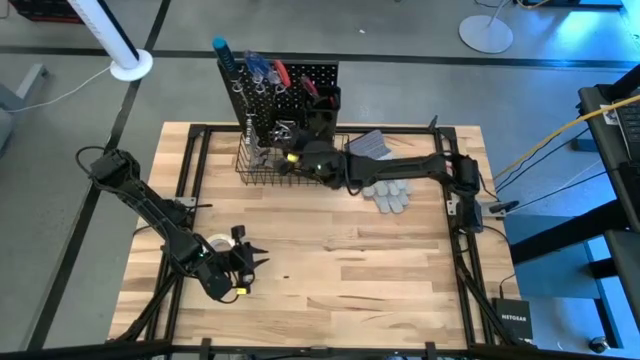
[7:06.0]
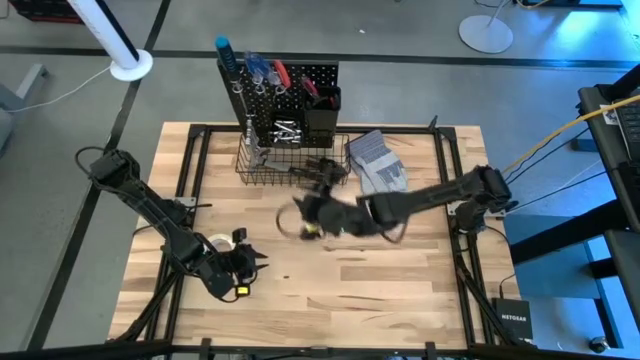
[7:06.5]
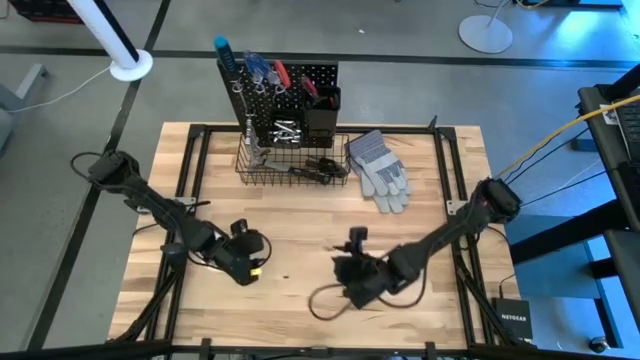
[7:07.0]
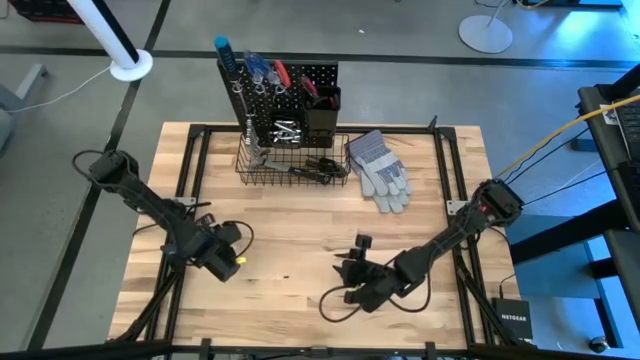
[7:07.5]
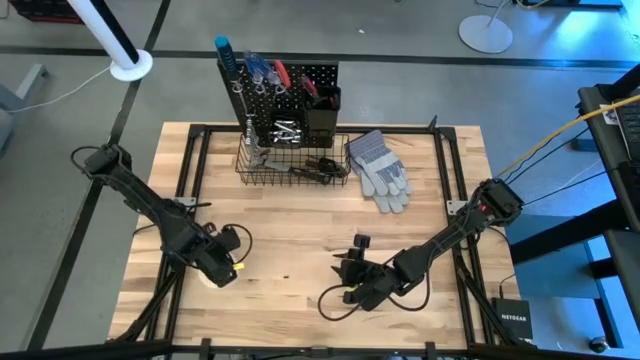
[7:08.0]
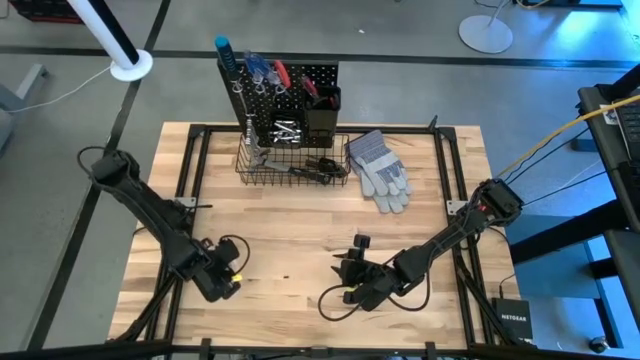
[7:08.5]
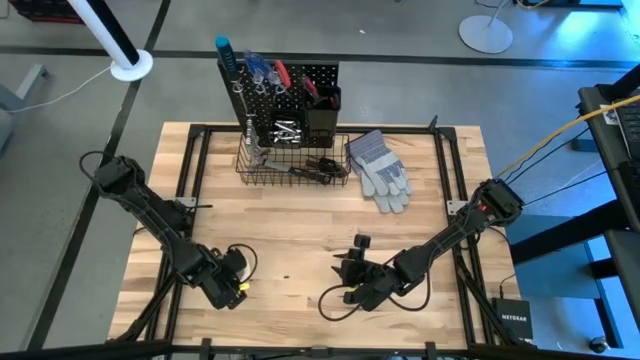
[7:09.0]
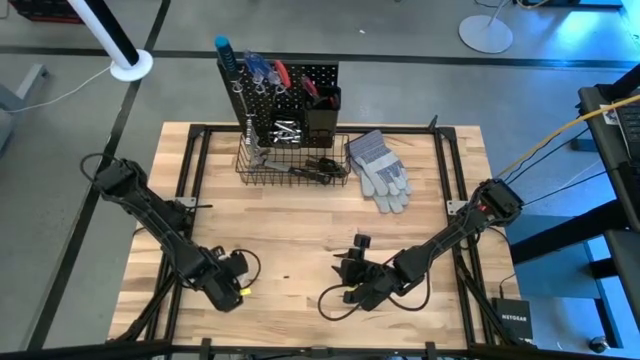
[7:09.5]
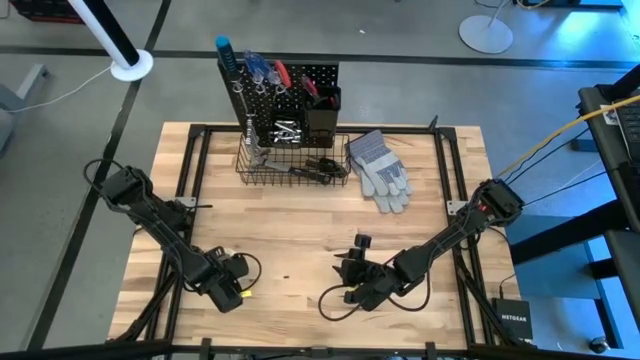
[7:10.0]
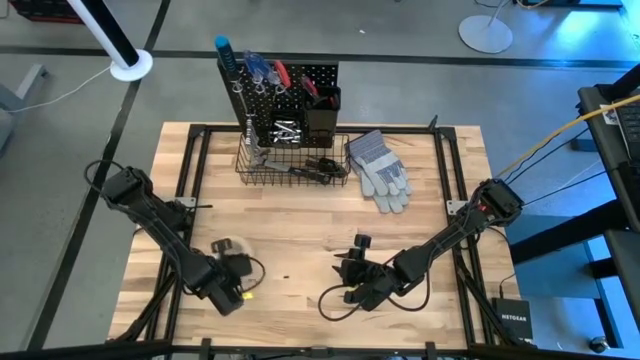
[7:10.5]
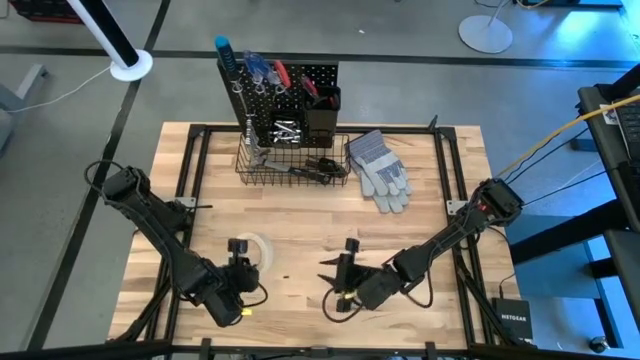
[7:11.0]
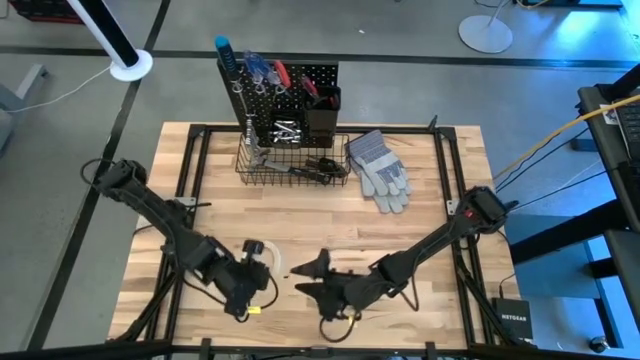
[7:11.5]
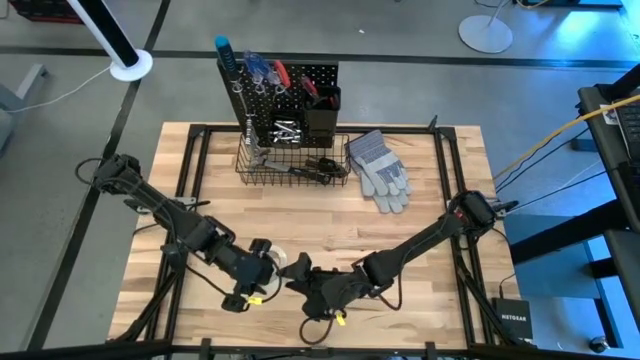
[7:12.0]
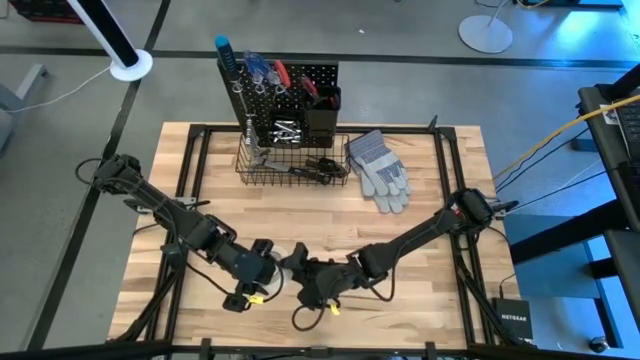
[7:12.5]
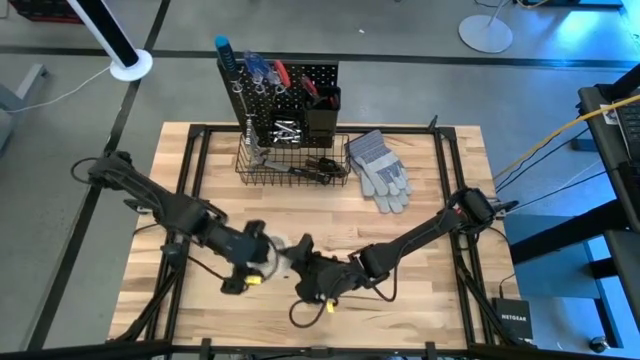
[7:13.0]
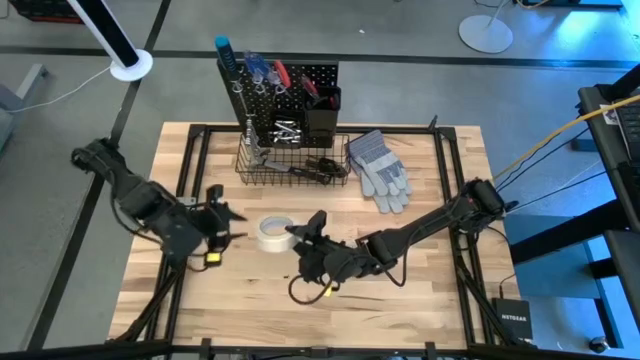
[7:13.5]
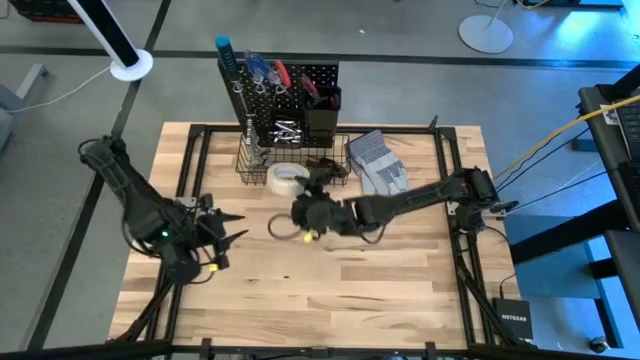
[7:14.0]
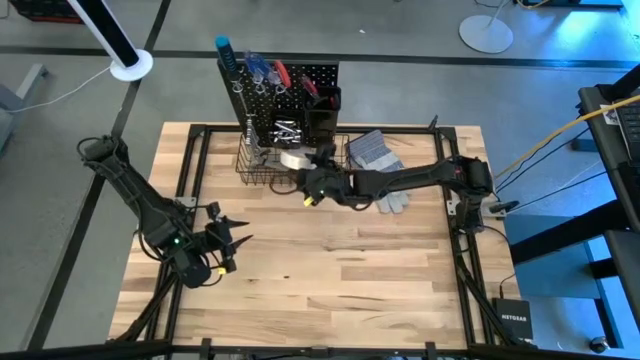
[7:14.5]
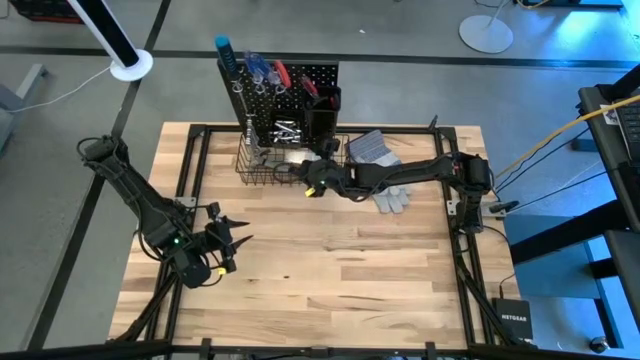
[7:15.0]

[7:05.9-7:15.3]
Task: Hang tools onto peg board
Put the adhesive tape into the wire basket on the peg board

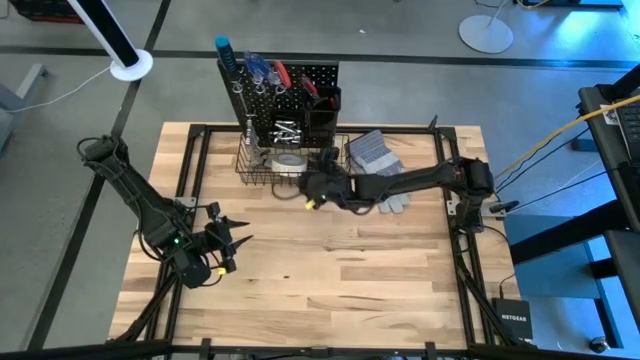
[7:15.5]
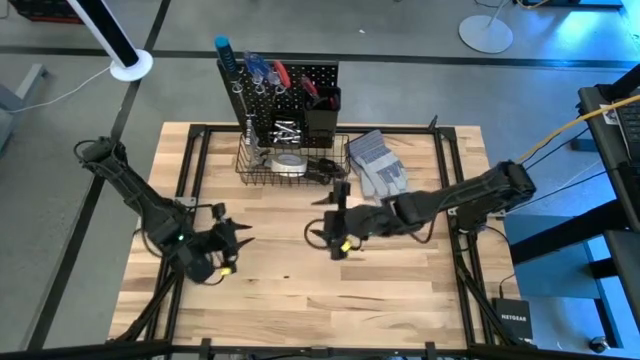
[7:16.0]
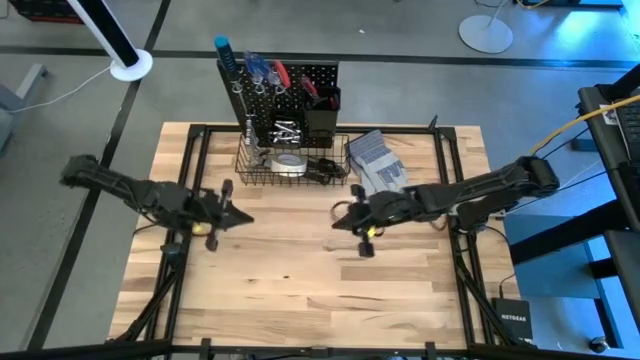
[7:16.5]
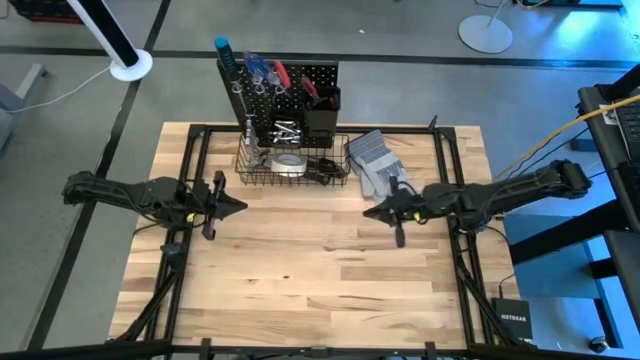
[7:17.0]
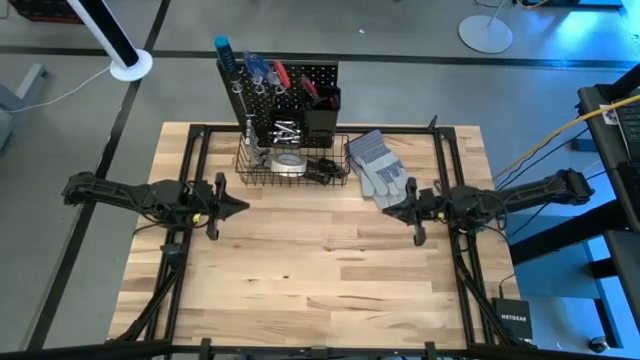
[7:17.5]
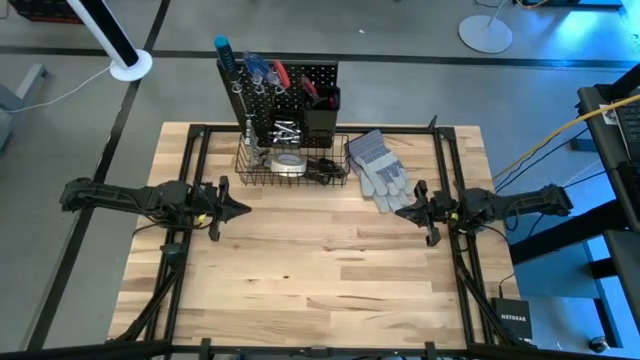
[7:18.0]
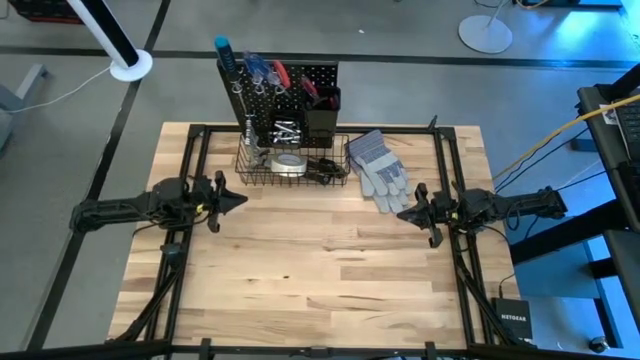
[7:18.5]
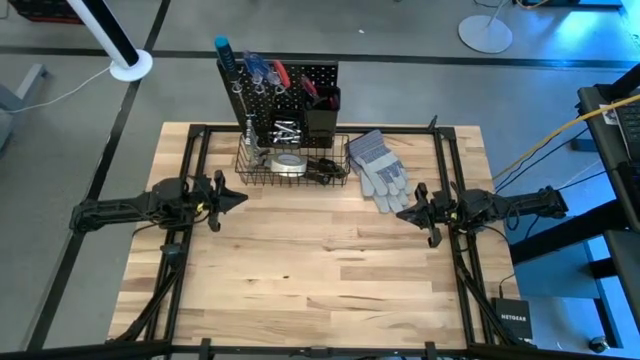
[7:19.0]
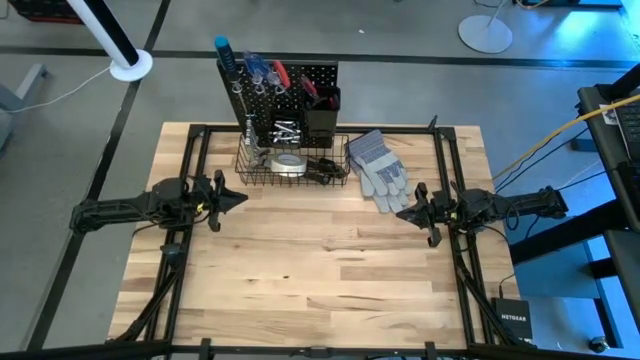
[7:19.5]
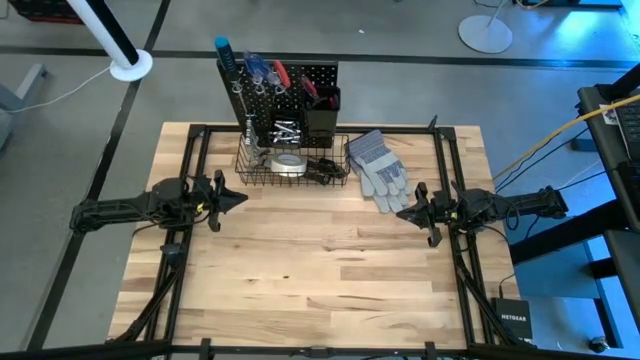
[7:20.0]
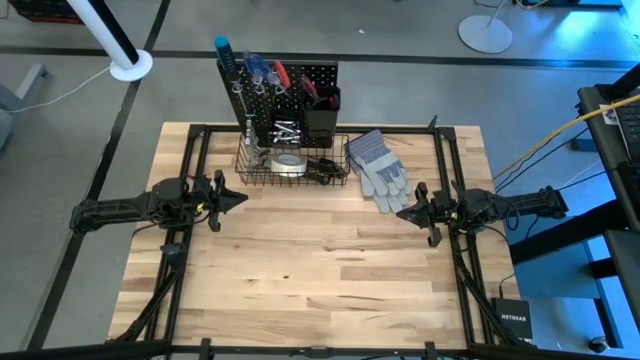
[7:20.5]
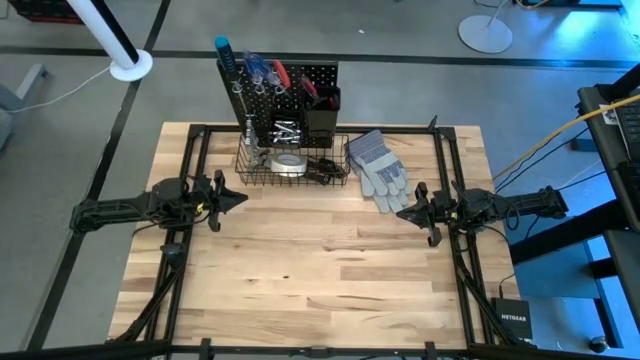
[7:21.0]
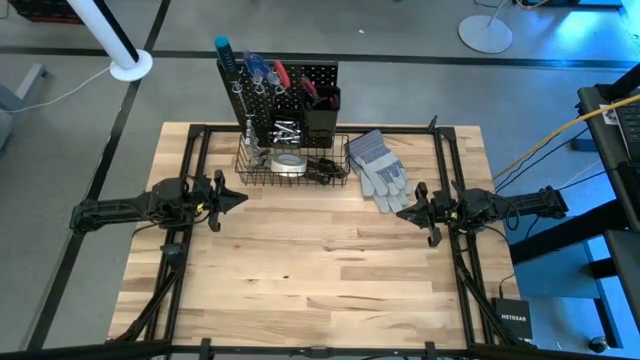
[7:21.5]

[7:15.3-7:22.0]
Return to Home Position

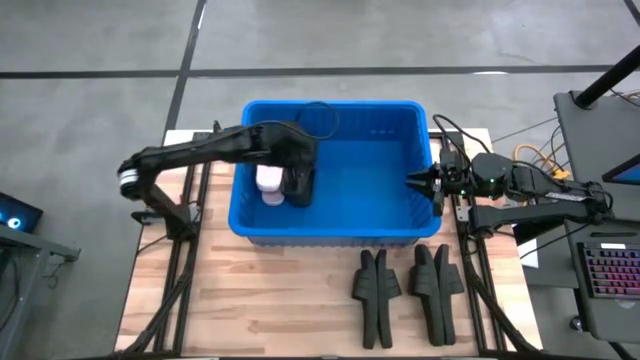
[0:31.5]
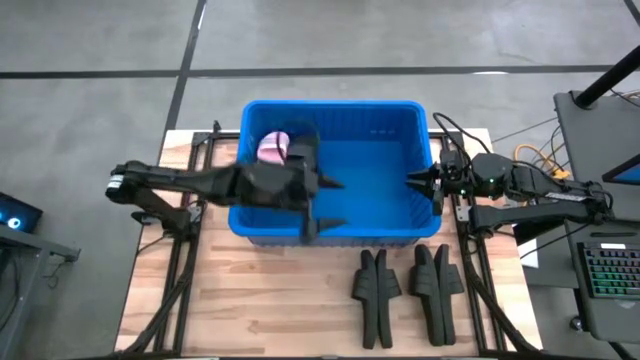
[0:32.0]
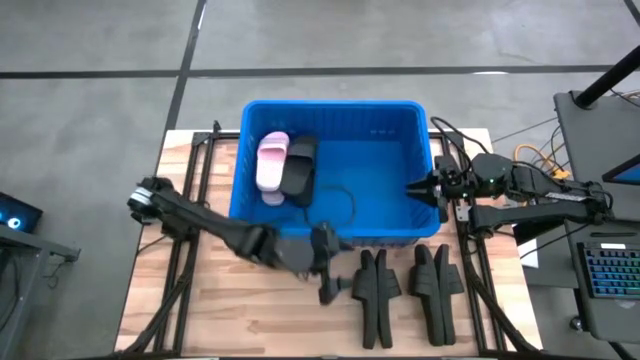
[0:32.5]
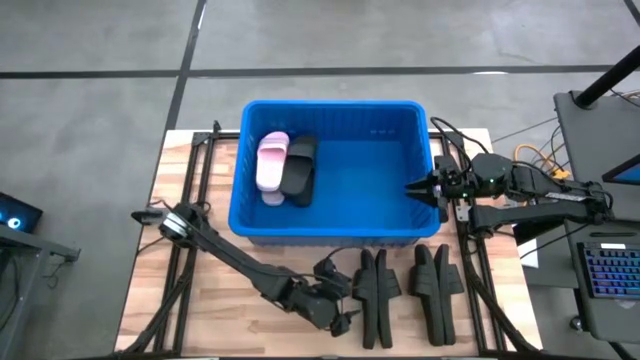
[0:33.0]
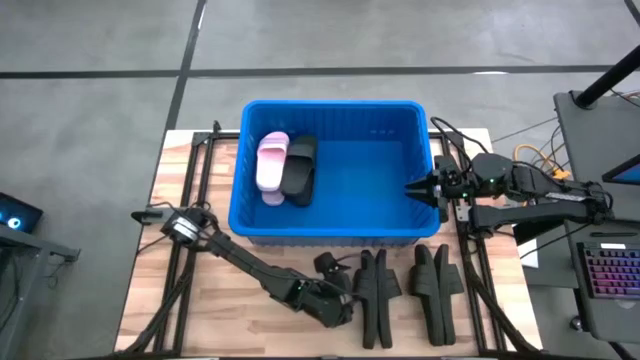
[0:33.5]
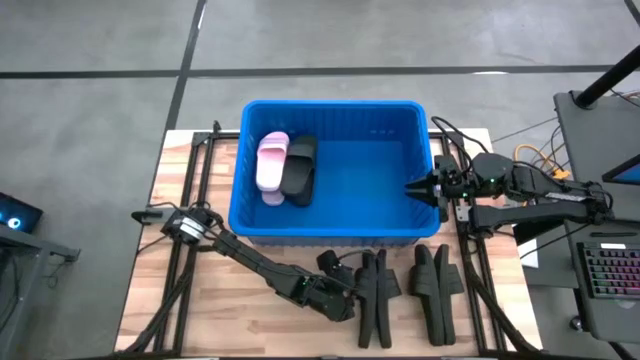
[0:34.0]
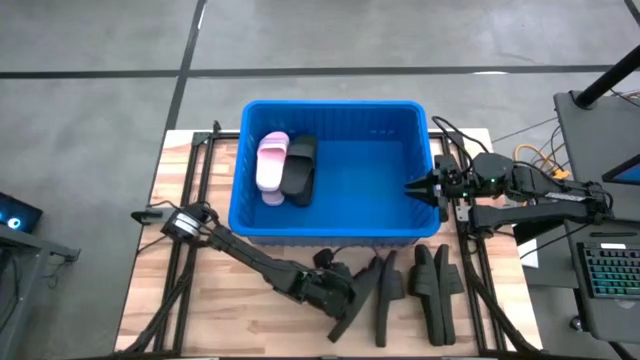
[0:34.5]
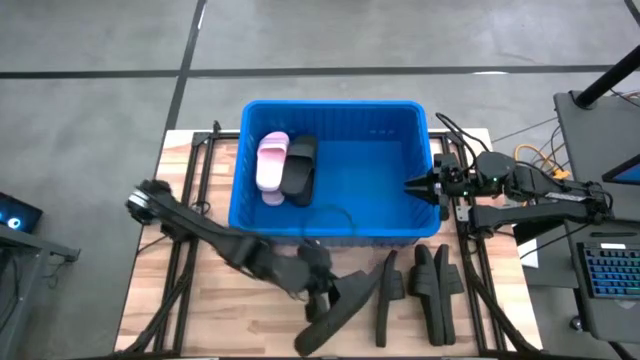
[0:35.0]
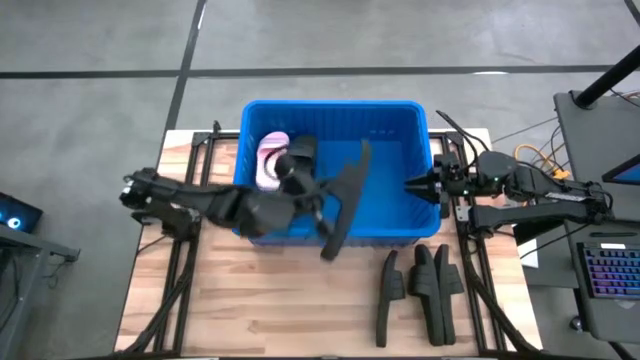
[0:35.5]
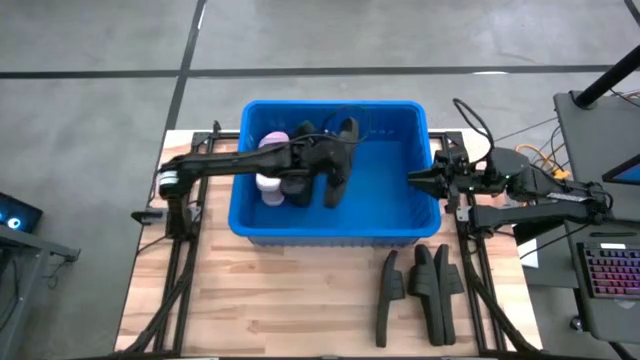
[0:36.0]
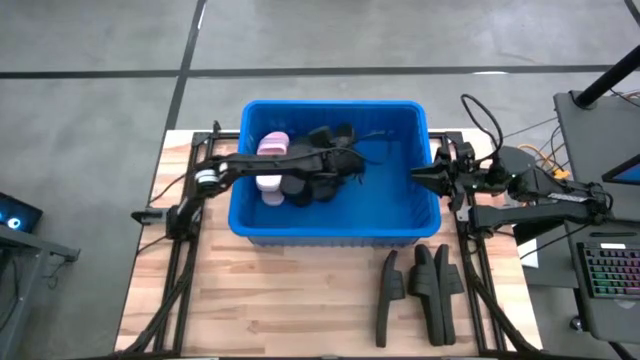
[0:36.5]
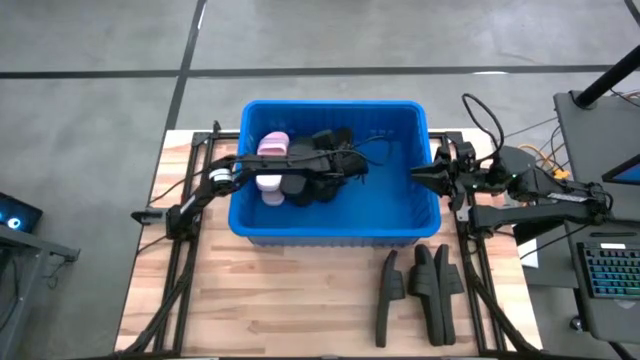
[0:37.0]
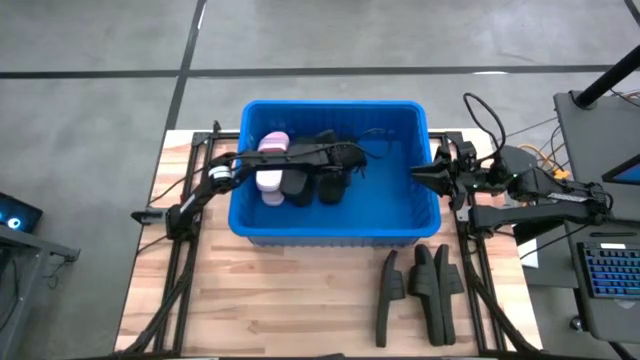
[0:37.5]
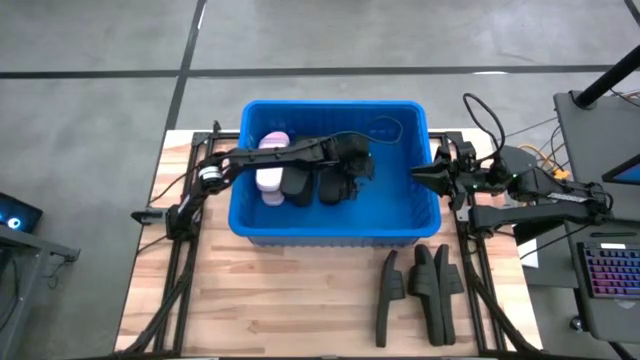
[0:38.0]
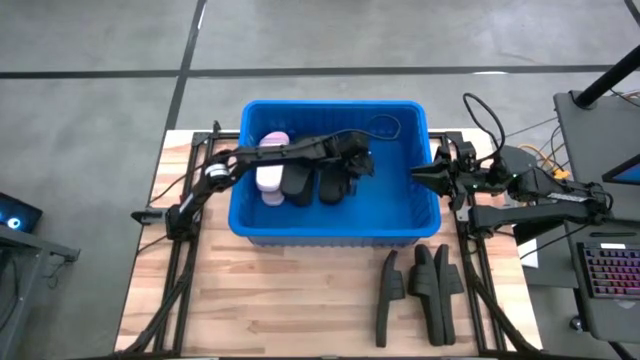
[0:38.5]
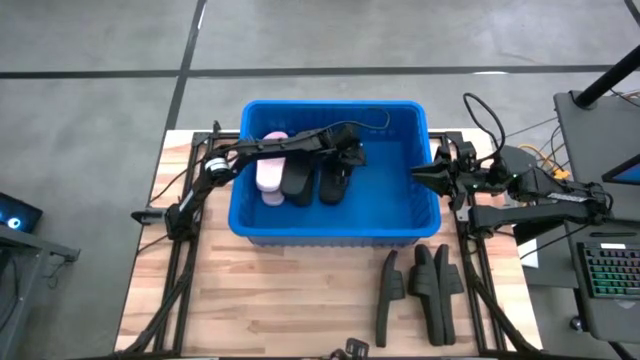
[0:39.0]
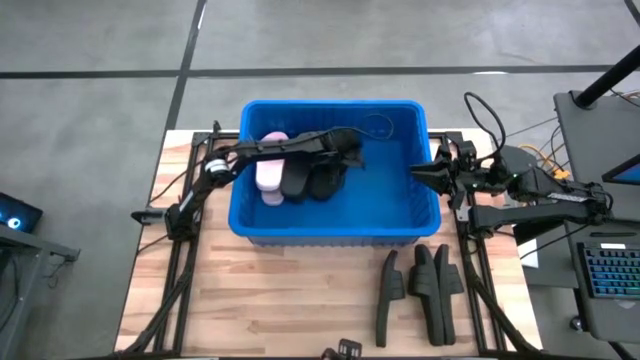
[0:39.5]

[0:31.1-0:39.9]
Task: Pick and place slides into bin
Put the black slipper into the blue bin
